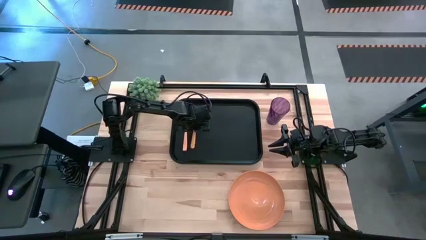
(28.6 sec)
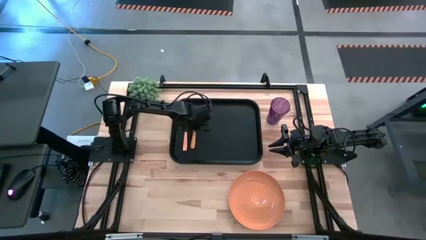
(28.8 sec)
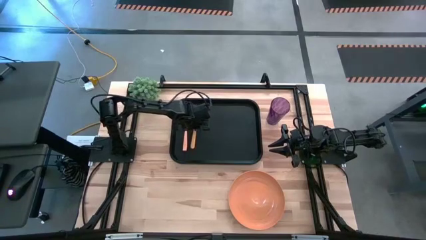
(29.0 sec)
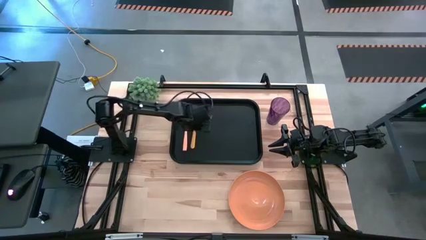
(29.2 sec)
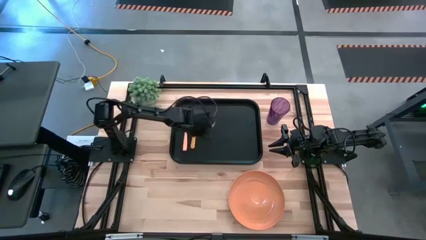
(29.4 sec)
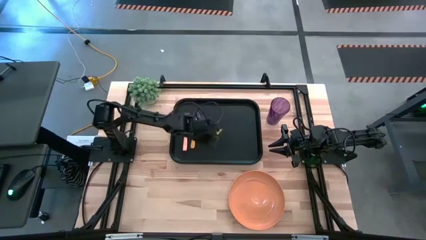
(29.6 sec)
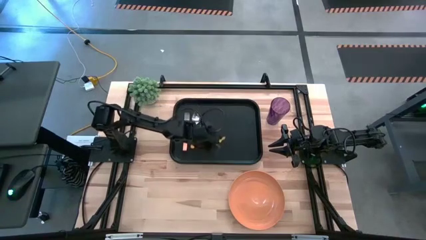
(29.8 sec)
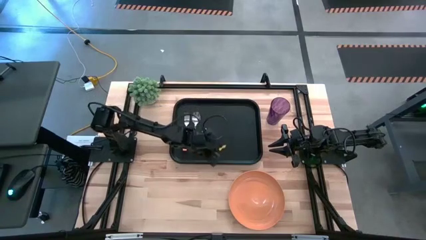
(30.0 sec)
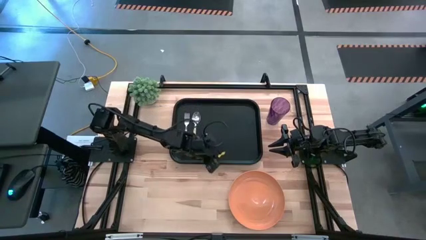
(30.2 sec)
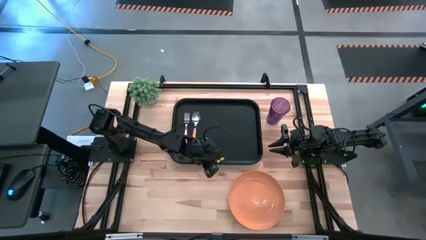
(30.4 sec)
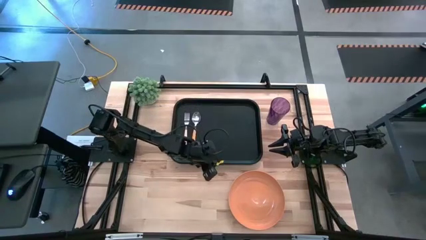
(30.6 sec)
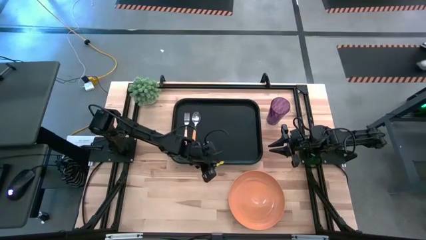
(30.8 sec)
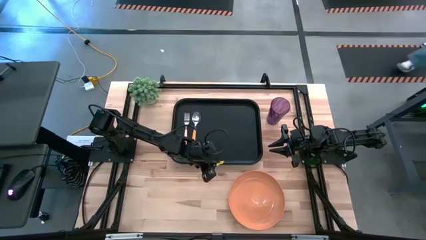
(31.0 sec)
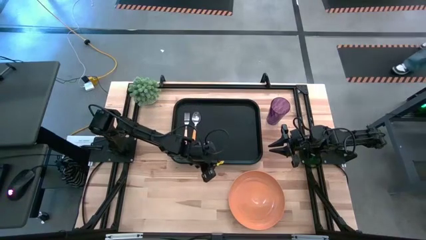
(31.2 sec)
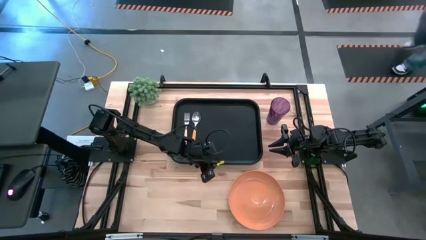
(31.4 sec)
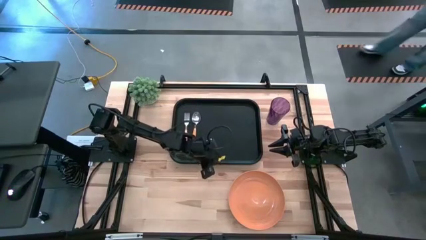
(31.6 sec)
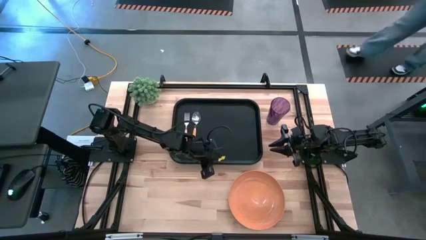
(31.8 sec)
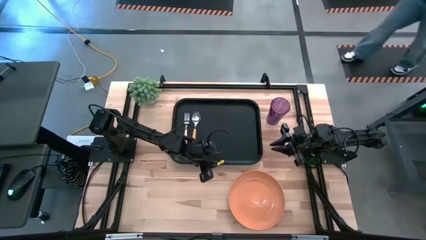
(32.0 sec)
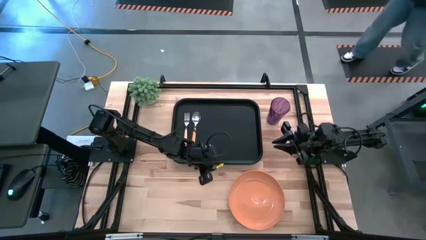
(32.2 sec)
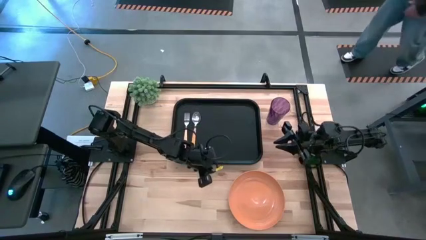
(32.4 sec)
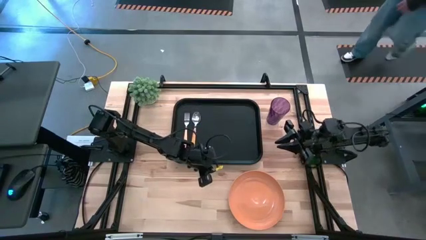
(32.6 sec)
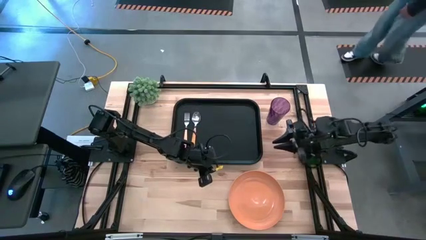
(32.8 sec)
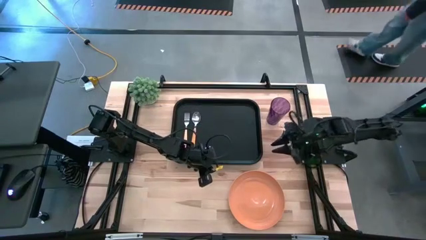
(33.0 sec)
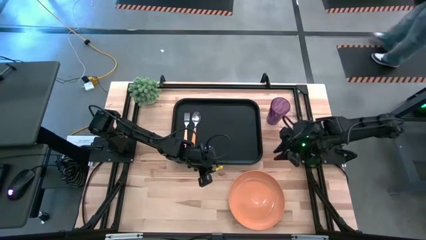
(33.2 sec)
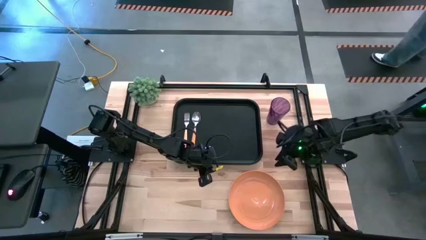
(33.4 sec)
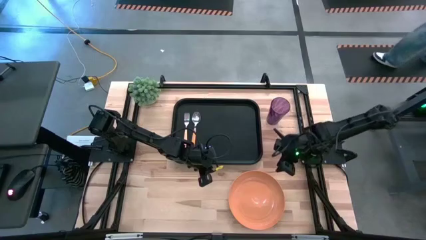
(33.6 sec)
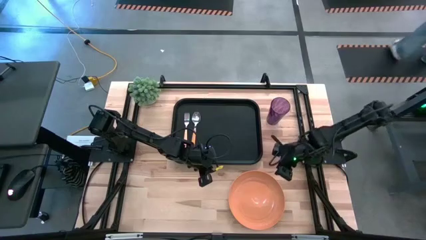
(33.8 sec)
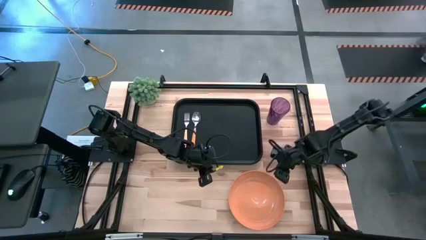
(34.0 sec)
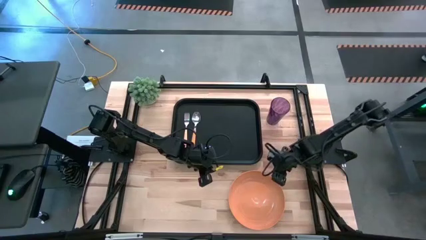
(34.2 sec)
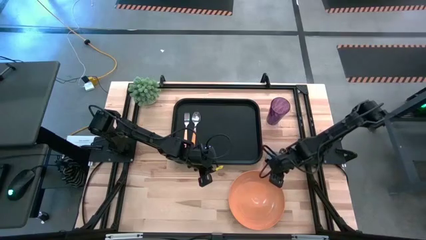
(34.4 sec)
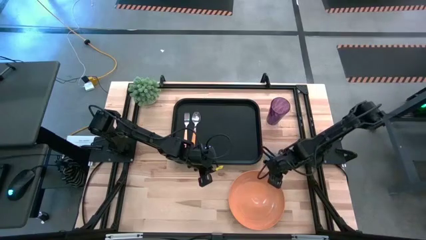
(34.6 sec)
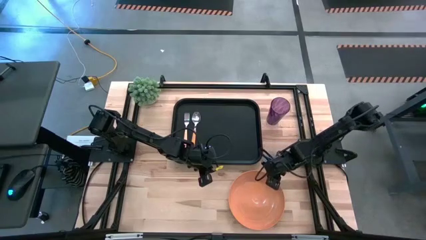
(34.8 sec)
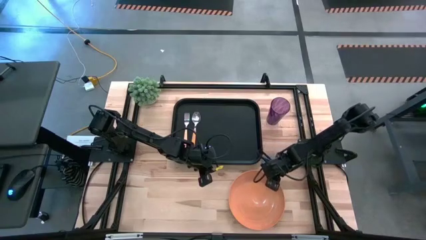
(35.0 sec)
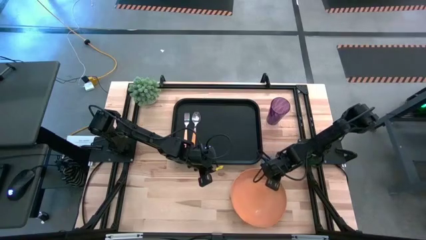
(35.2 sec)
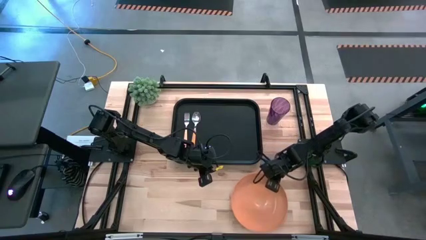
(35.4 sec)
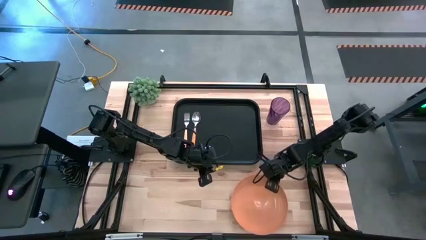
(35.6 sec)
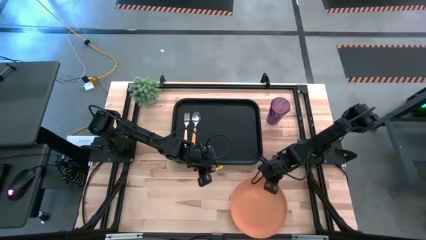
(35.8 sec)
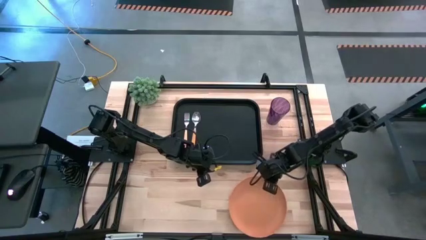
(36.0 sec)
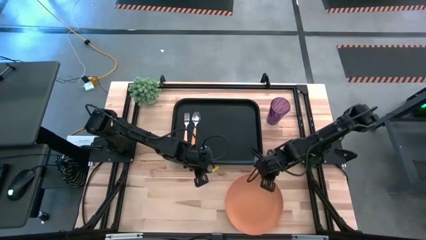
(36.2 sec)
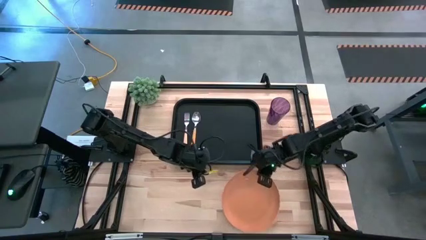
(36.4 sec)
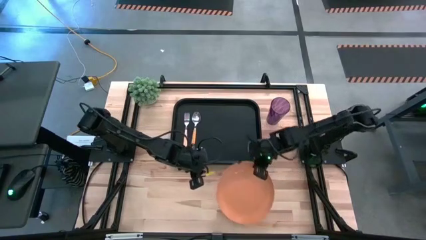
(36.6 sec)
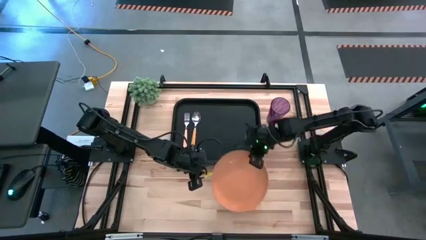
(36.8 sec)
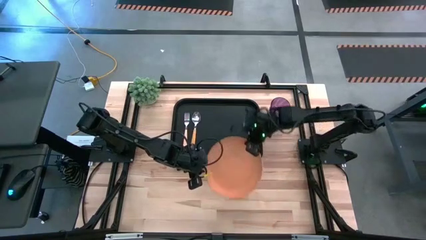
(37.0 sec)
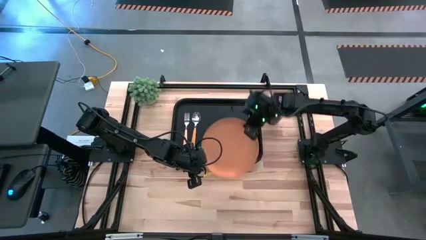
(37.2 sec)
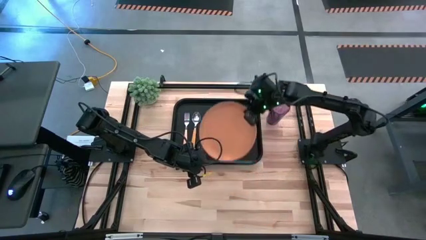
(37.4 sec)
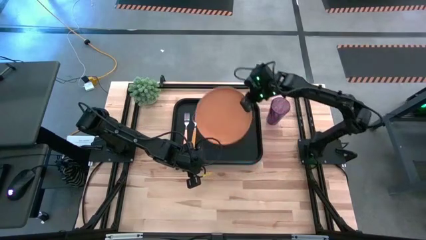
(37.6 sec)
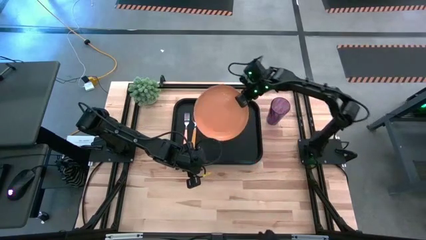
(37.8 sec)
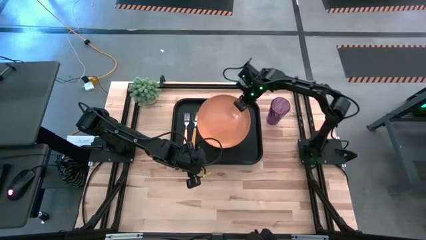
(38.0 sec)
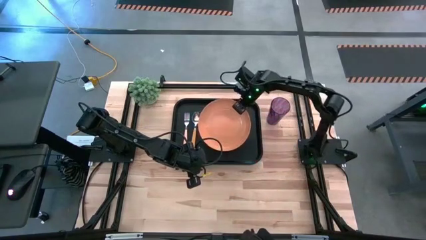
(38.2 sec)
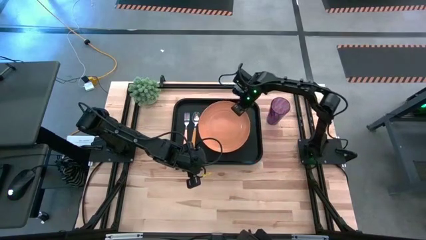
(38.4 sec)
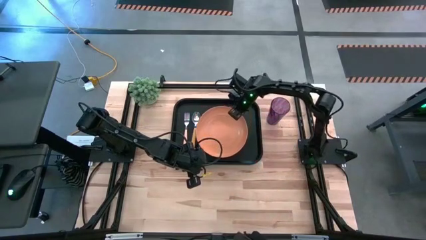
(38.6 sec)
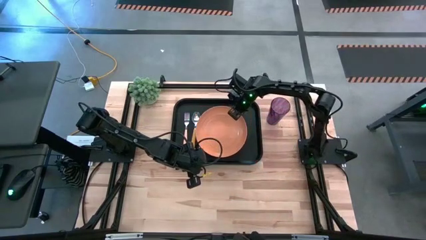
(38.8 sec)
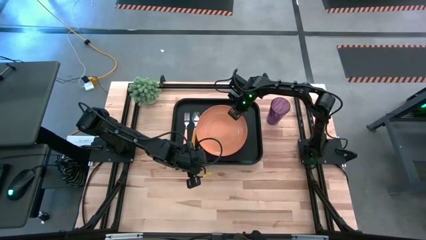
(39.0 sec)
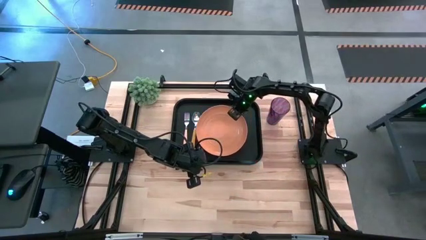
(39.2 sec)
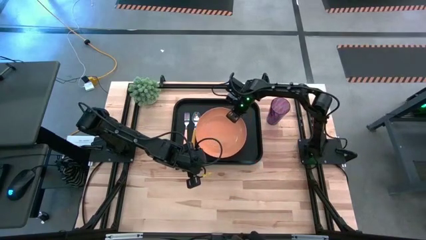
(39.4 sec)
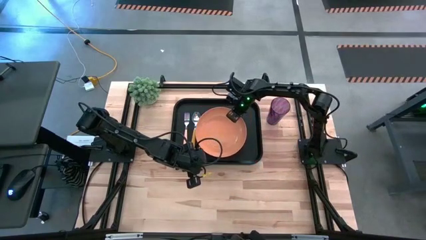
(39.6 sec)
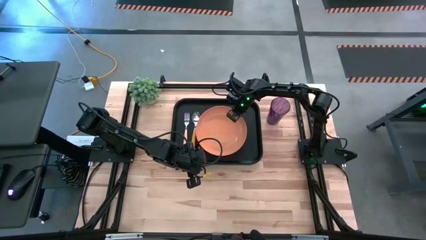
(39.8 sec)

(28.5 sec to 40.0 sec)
Task: Pick and place plate/cup/fork/spoon on tray
Put the orange plate on the black tray beside the orange spoon
